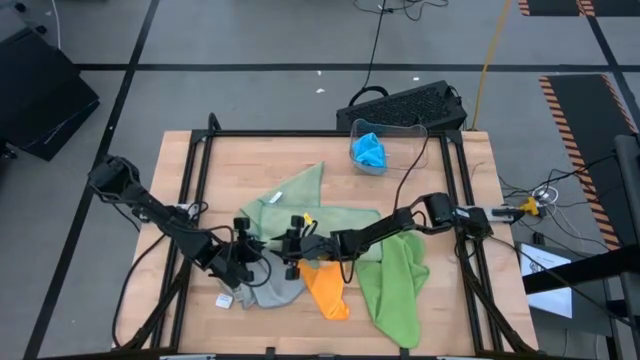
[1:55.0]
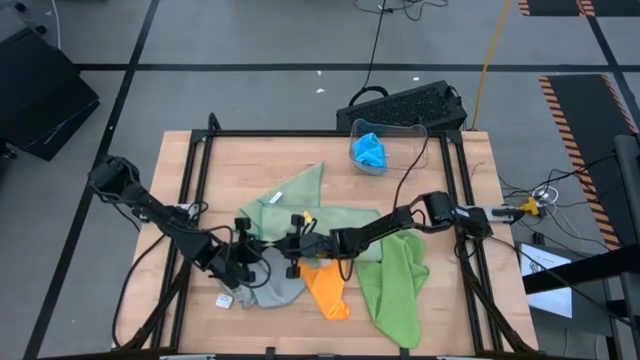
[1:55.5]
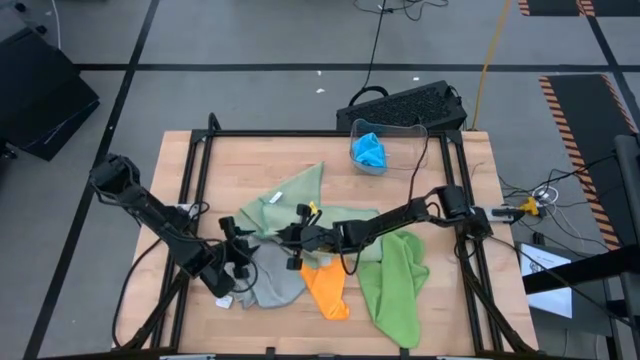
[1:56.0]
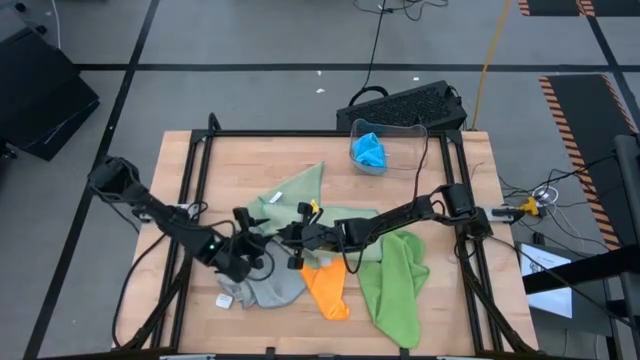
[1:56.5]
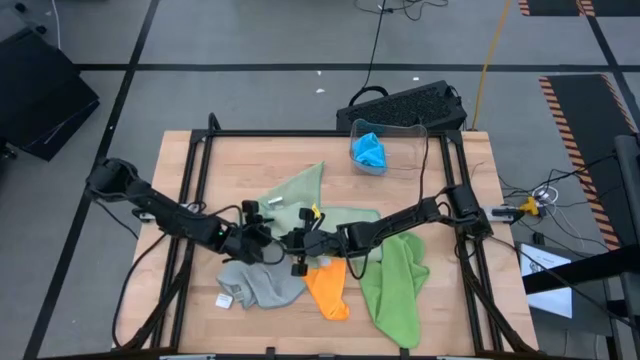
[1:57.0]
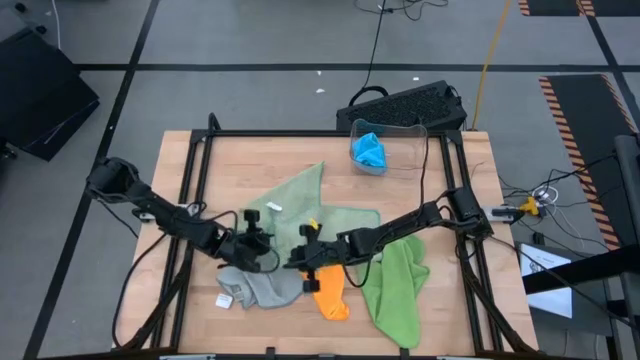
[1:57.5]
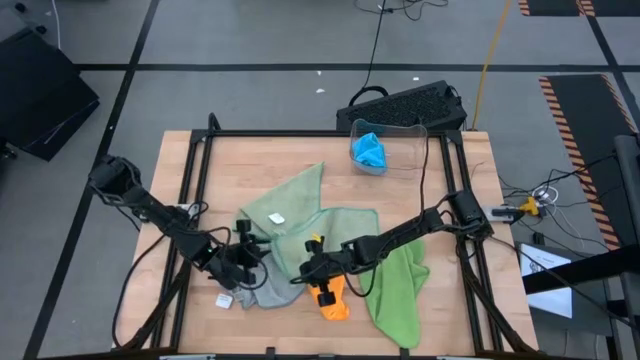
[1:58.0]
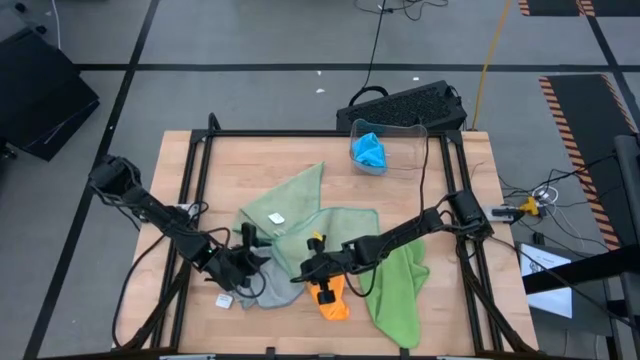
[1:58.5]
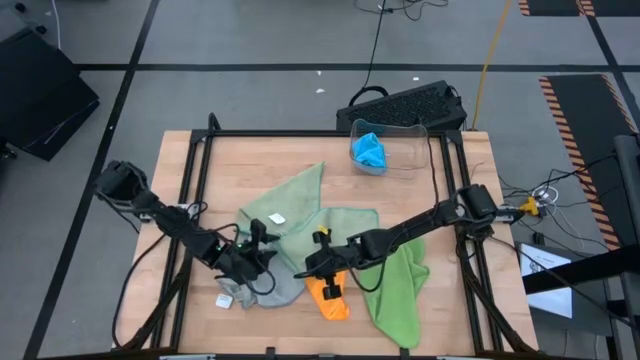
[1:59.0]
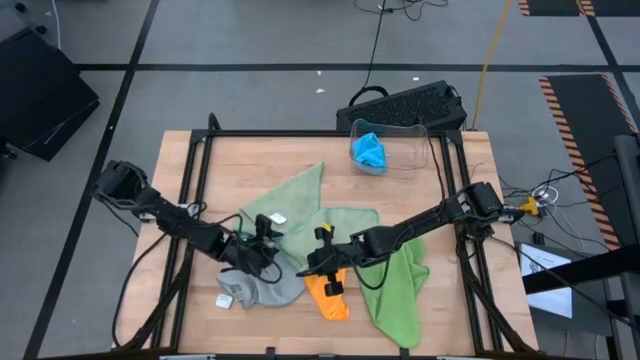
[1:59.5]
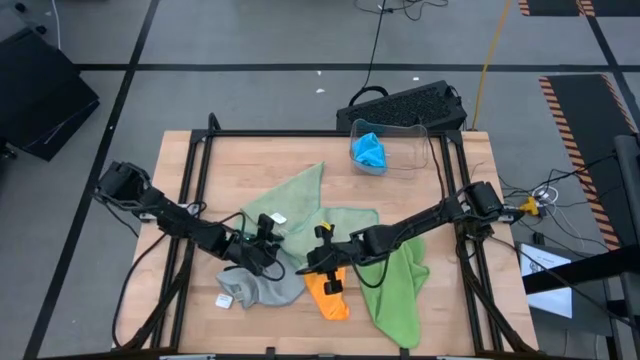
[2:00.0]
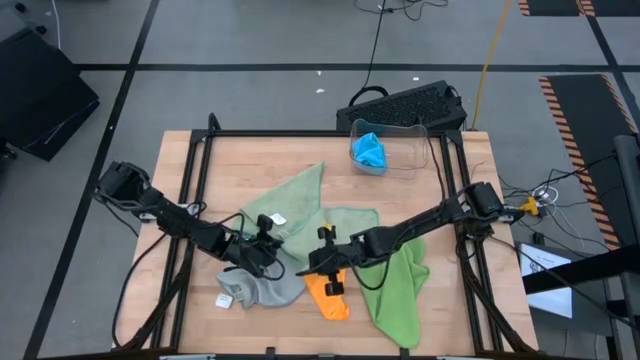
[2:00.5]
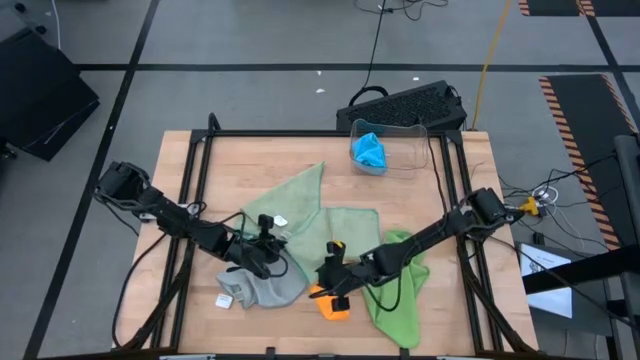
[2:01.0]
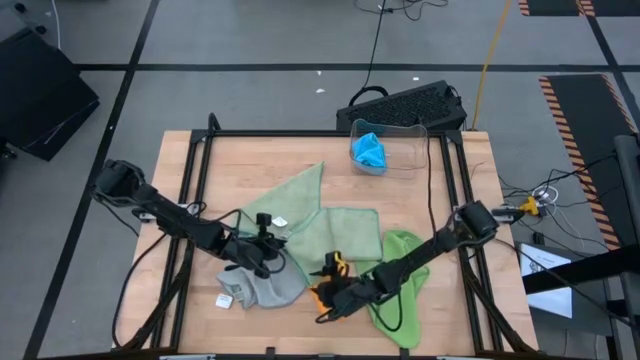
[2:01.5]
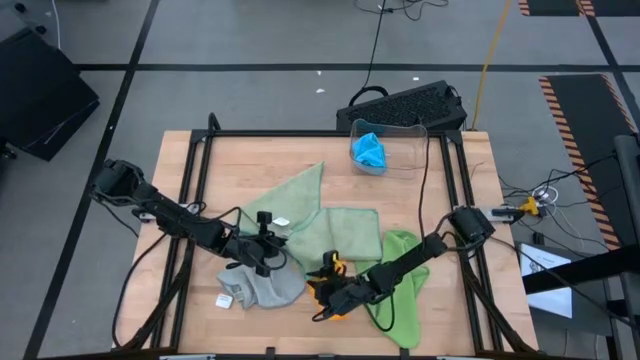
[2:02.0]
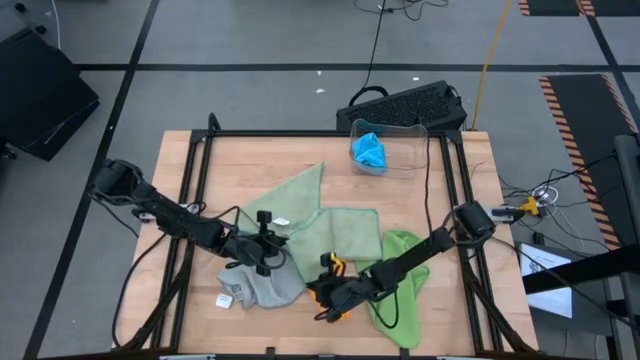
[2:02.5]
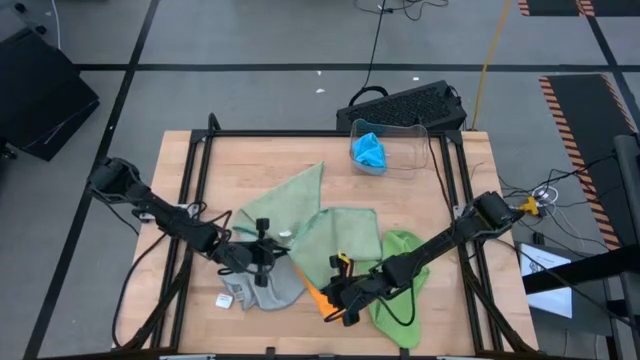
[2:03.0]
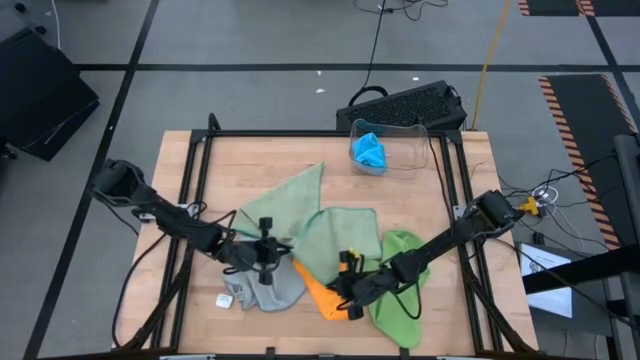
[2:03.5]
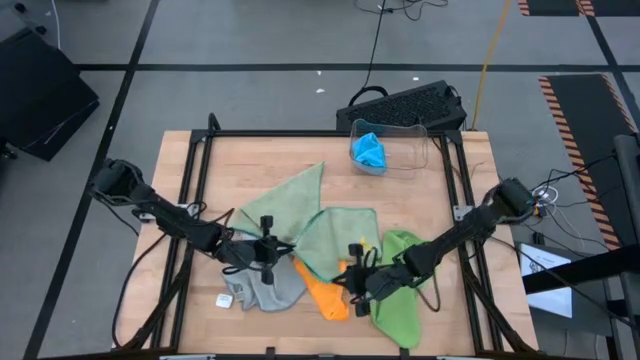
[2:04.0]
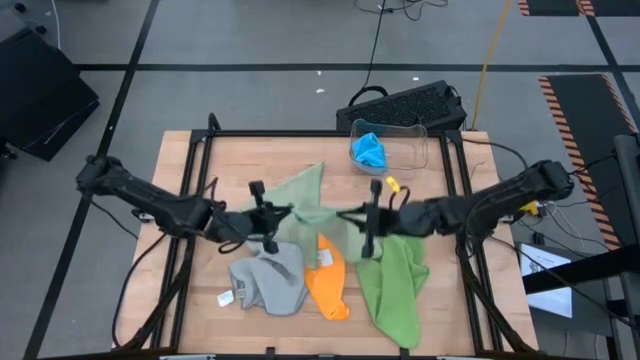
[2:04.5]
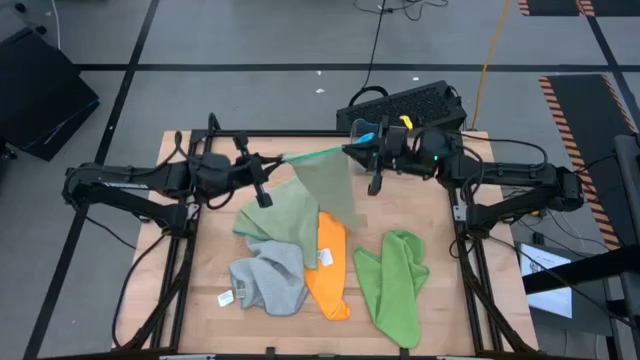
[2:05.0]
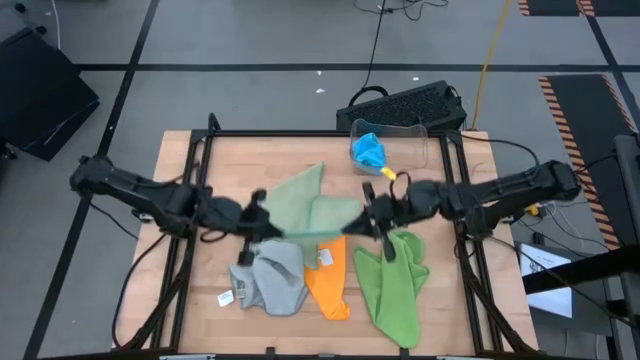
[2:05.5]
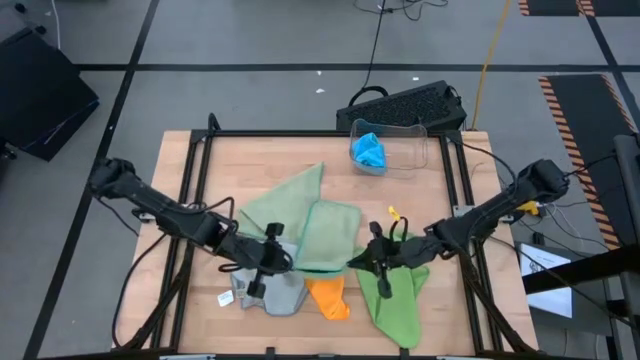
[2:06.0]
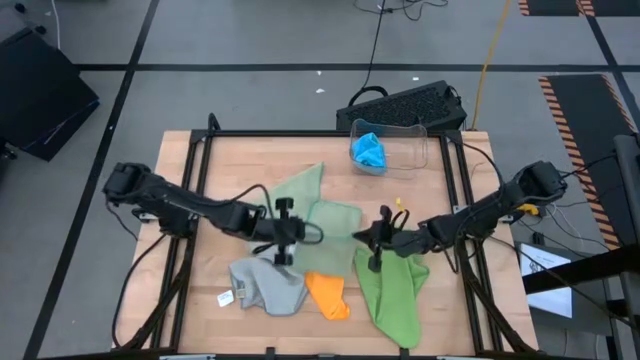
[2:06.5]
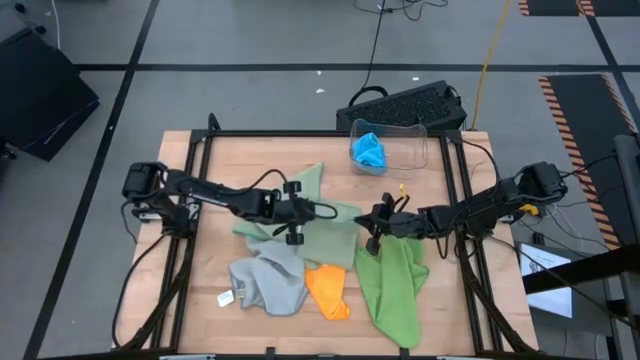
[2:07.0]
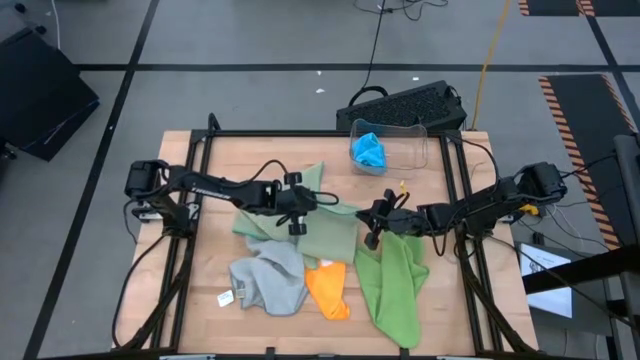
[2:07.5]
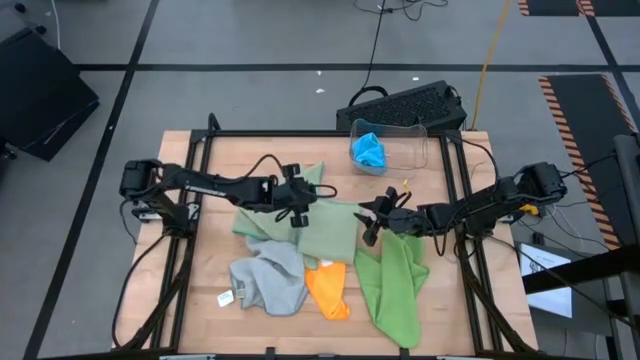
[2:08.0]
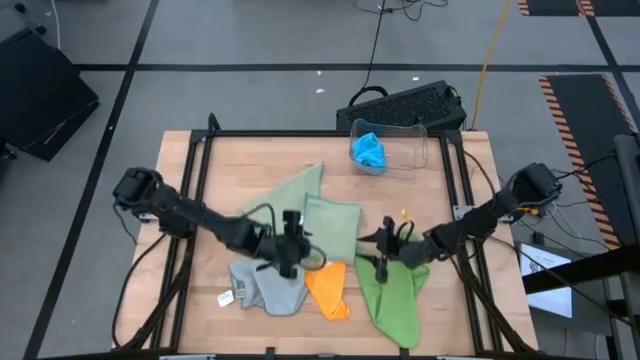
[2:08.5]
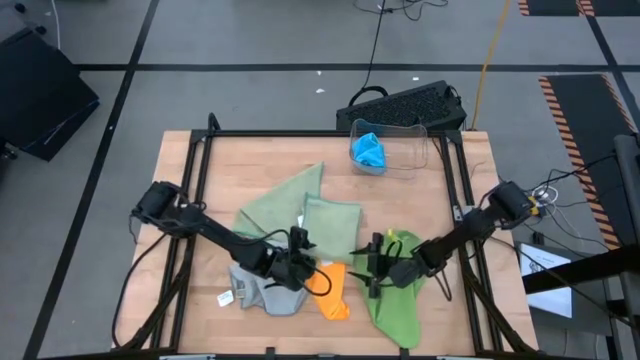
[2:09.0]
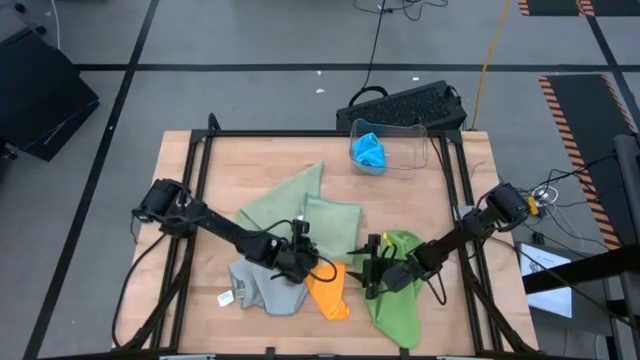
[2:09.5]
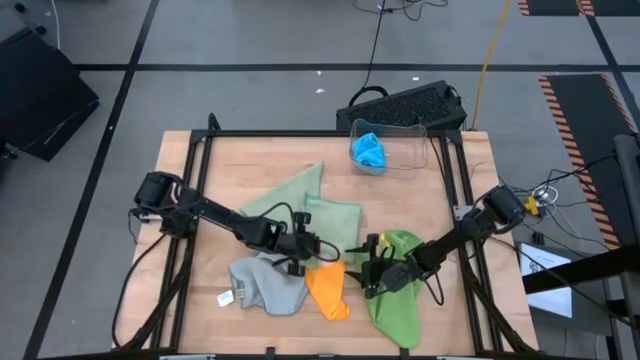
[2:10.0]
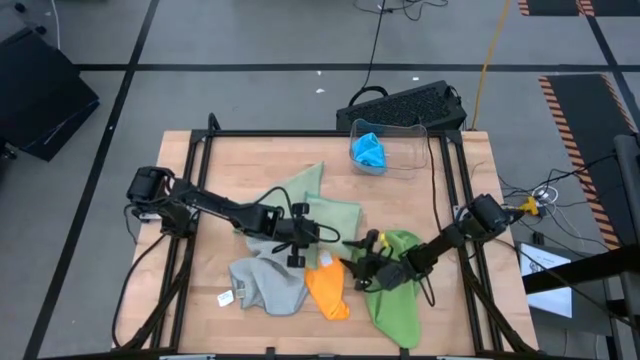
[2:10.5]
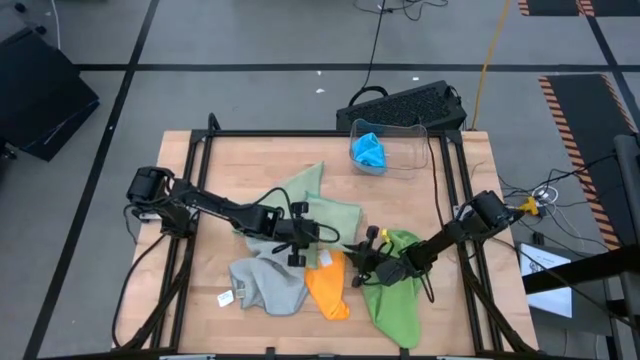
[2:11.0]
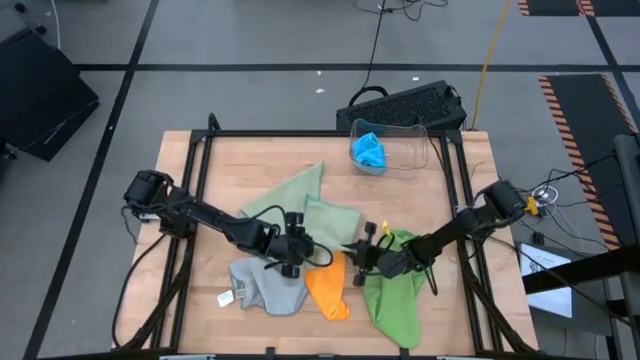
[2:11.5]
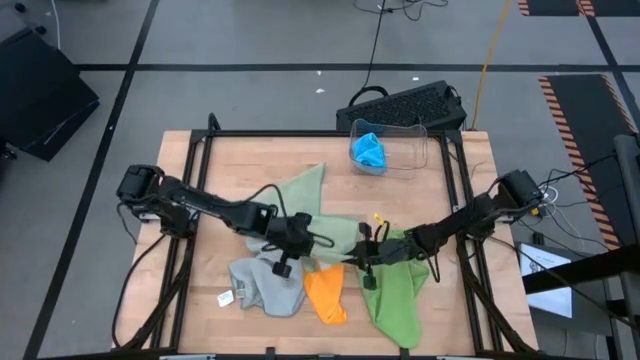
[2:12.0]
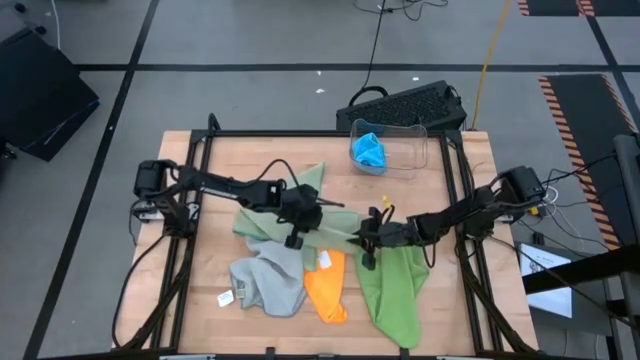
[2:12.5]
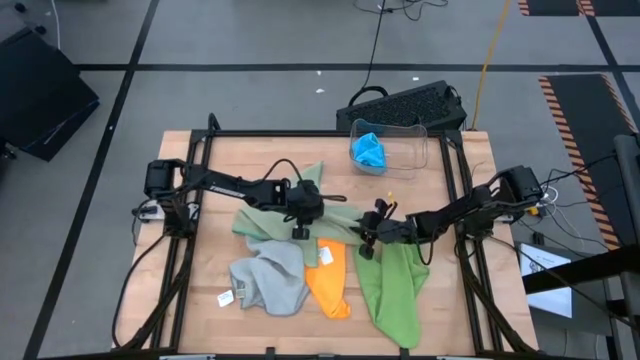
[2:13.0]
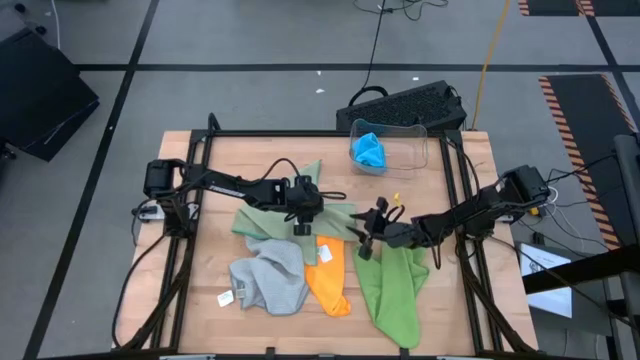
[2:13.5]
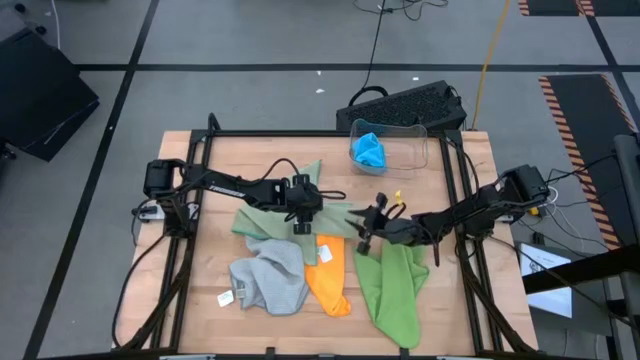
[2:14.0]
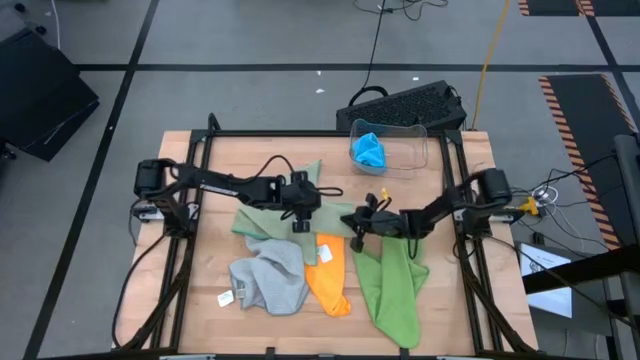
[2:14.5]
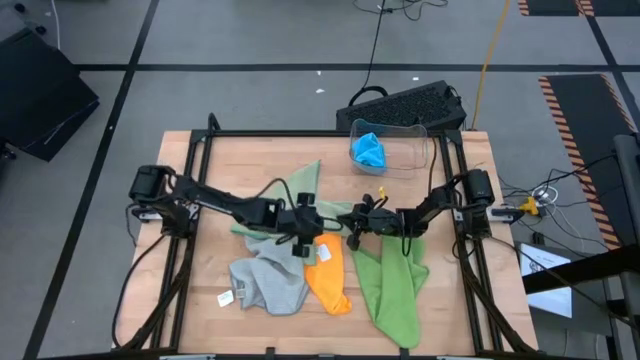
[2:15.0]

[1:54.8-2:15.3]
Task: Fold microfiber towels
Fold the right light green microfiber towel
